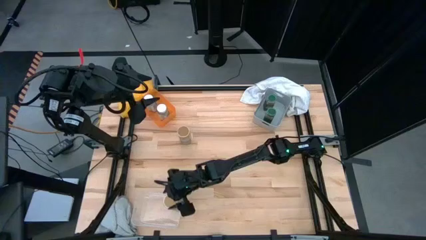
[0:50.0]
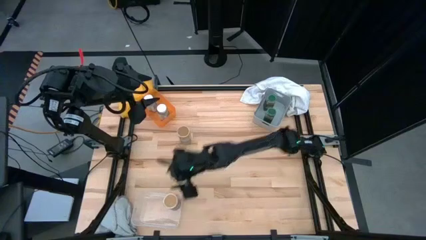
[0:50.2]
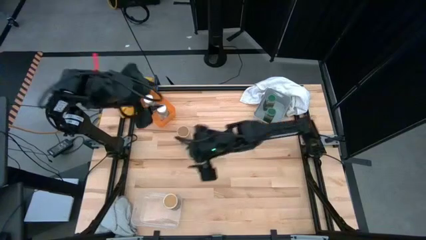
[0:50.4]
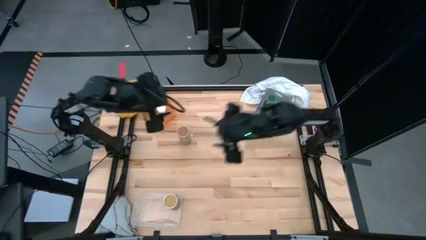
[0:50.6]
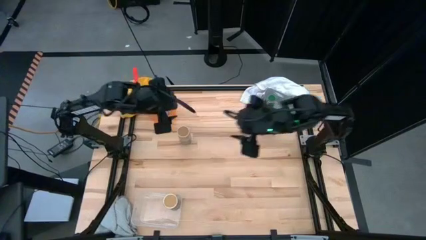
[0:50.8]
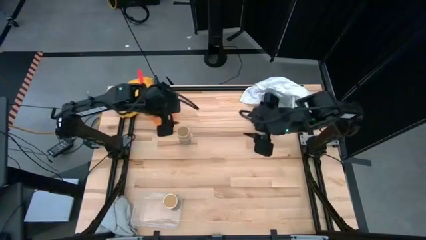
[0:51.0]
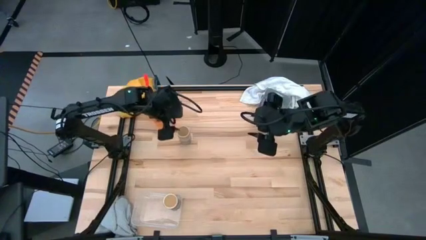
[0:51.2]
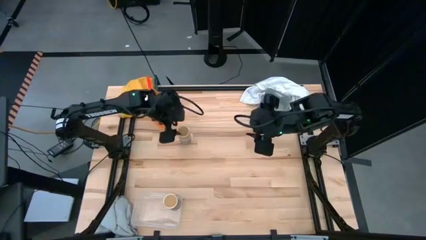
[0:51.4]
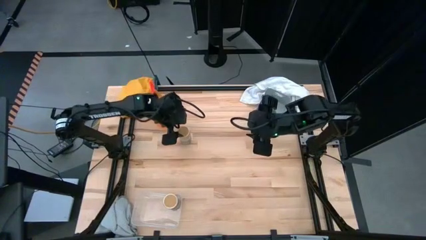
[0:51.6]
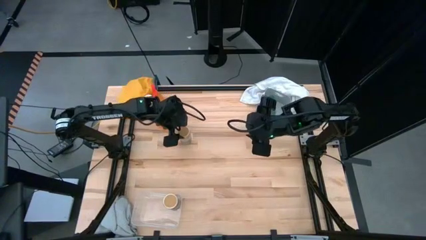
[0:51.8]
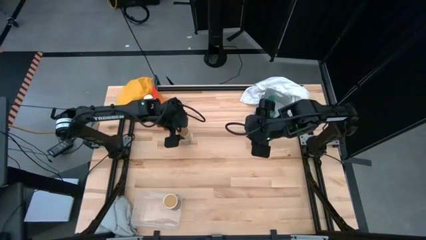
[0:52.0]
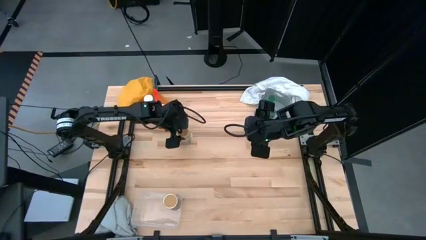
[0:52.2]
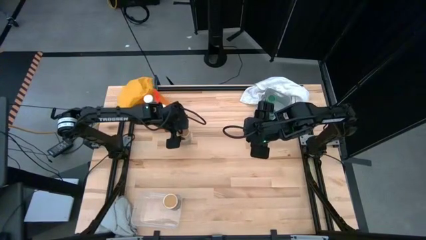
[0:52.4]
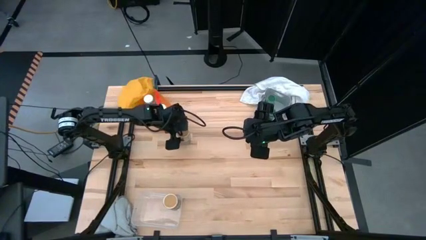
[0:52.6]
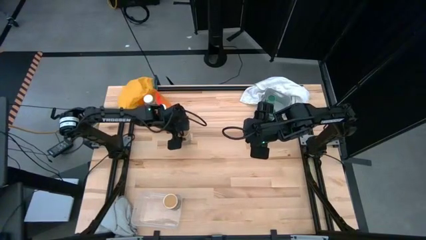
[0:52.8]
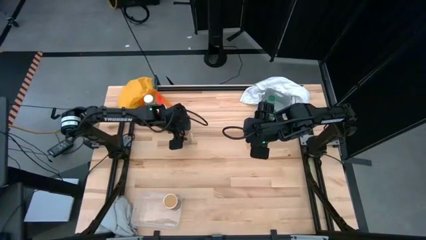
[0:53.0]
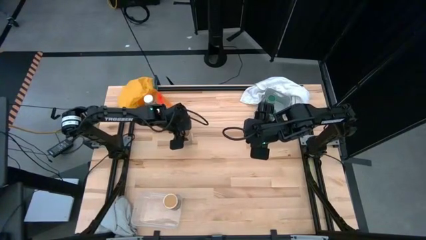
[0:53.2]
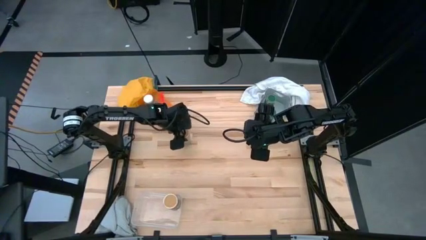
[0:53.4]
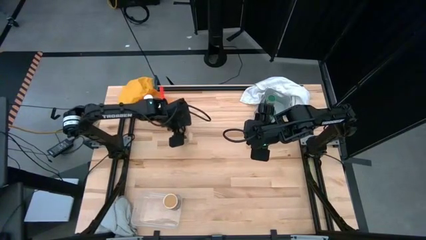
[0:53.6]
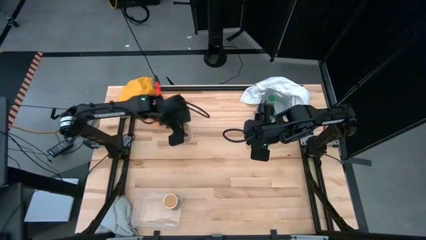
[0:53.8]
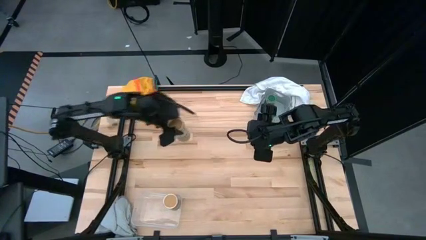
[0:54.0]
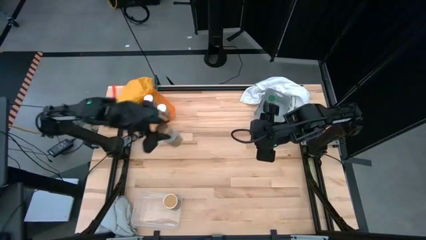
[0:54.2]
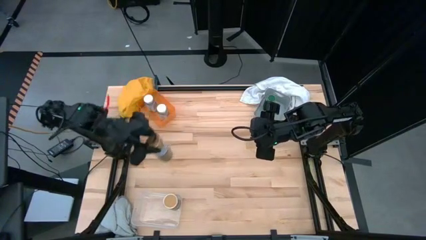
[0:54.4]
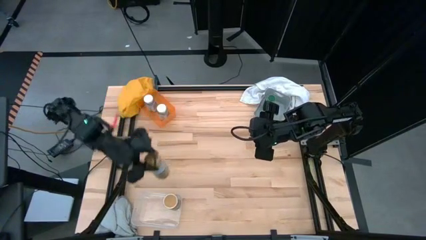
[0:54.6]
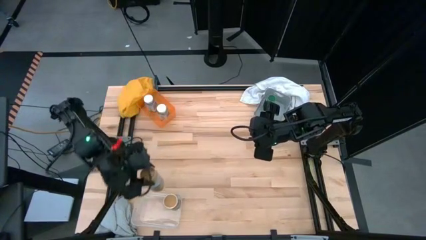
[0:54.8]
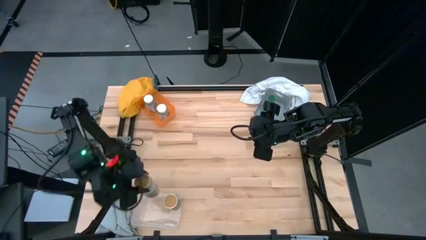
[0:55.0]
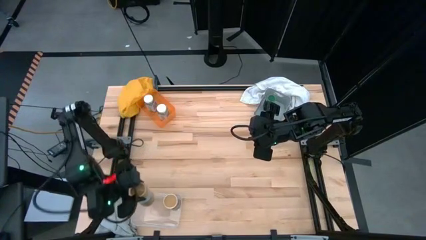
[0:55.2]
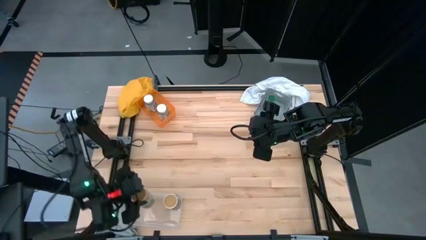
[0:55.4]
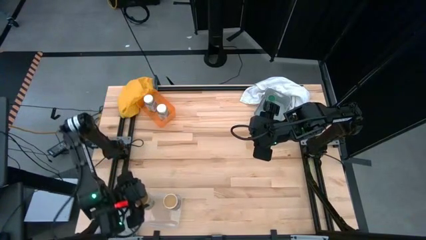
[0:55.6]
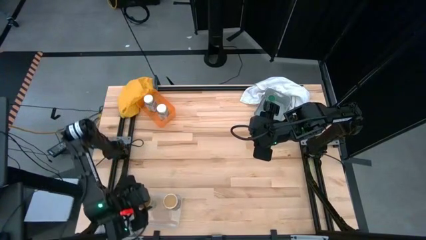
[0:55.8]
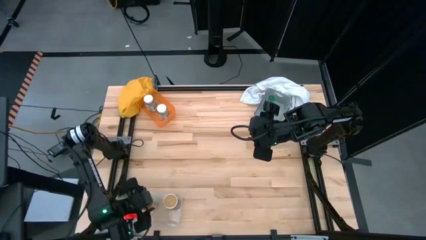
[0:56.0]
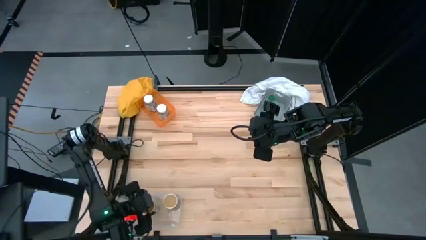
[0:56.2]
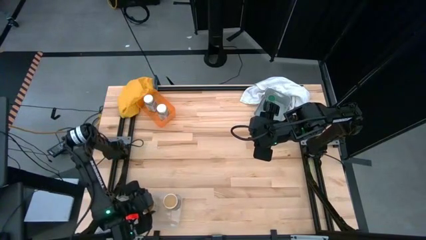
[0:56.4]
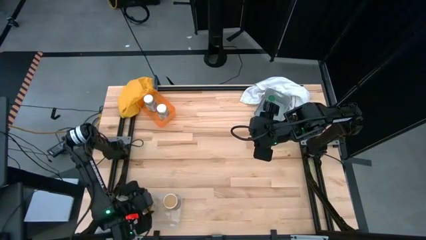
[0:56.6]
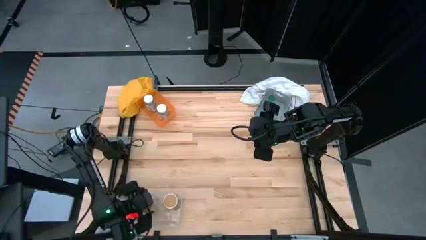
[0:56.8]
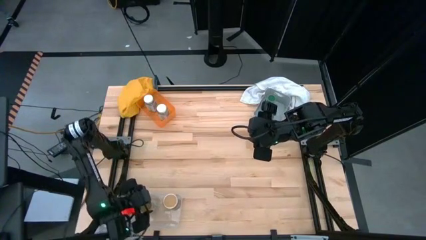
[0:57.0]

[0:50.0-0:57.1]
Task: Sort spices by type
Put the gold seasoning bottle into the transparent bin

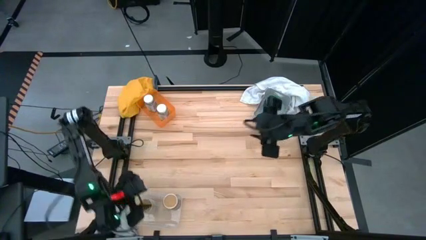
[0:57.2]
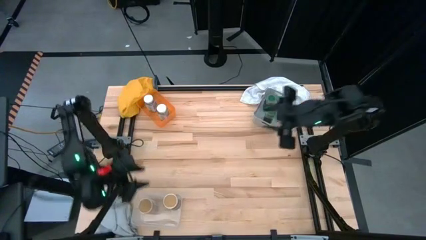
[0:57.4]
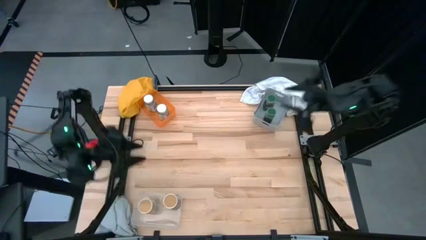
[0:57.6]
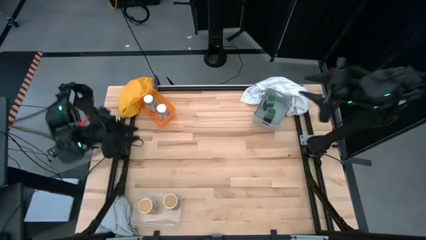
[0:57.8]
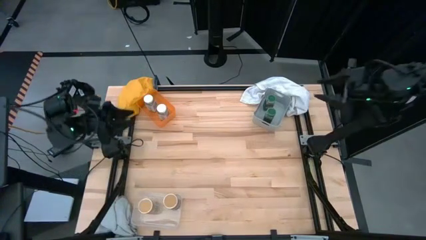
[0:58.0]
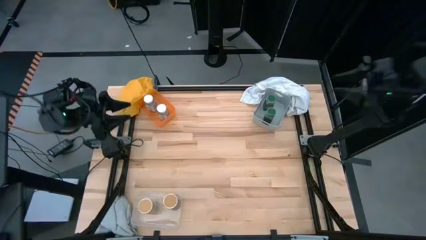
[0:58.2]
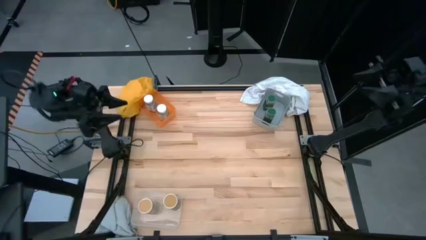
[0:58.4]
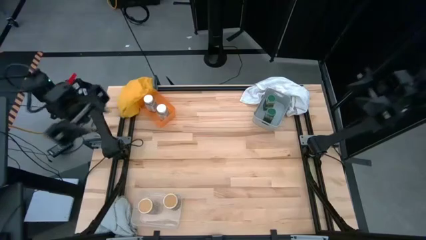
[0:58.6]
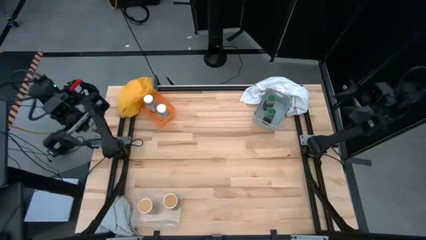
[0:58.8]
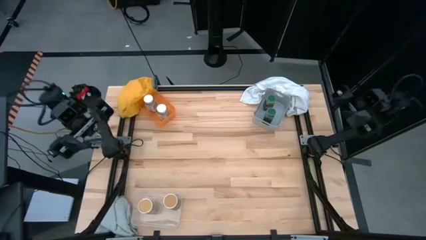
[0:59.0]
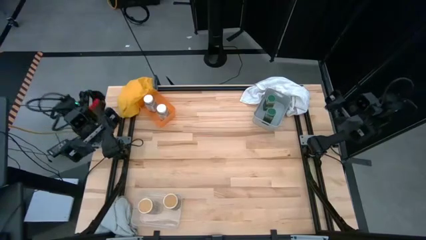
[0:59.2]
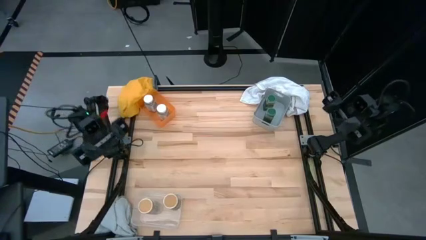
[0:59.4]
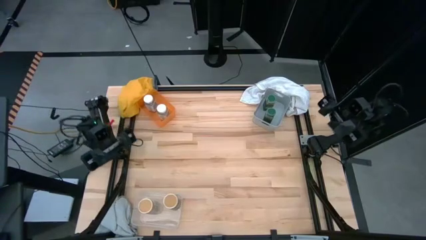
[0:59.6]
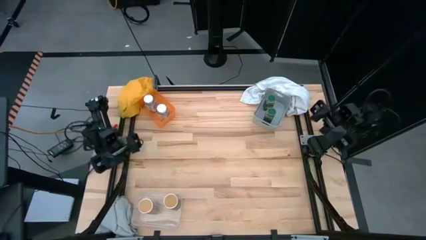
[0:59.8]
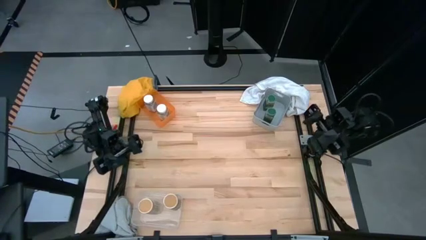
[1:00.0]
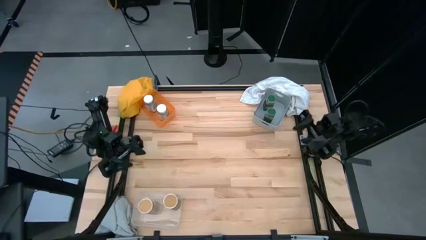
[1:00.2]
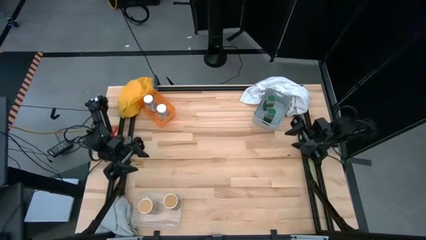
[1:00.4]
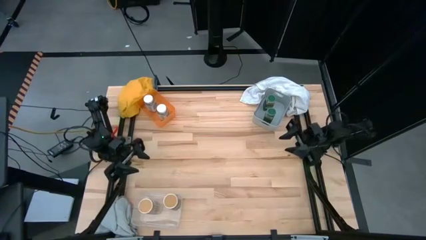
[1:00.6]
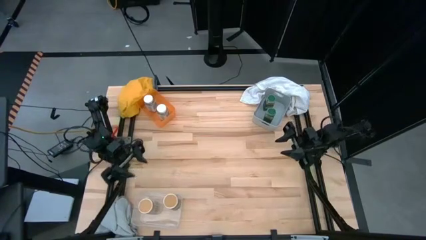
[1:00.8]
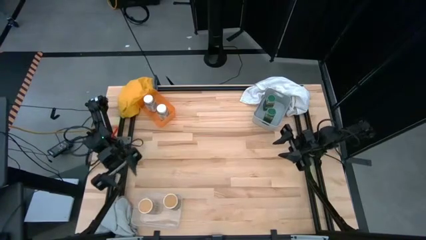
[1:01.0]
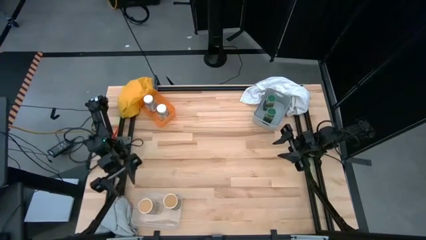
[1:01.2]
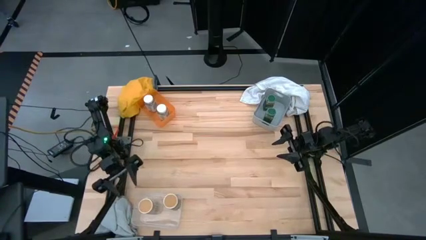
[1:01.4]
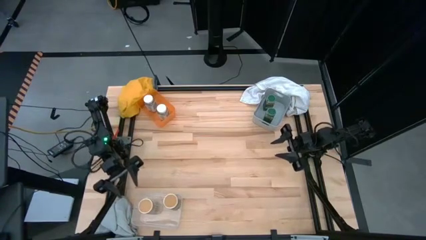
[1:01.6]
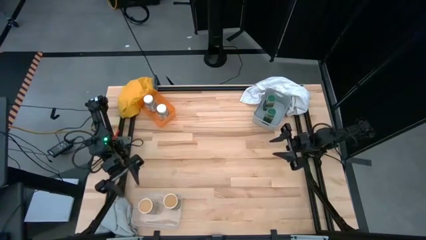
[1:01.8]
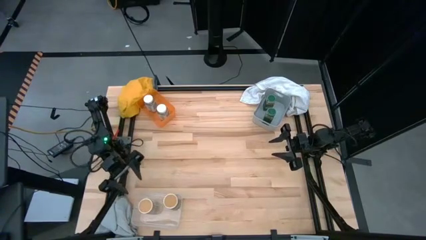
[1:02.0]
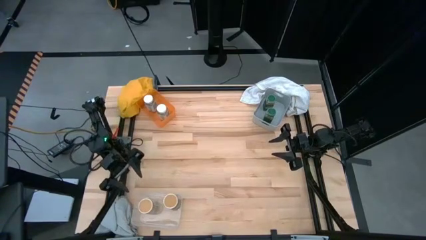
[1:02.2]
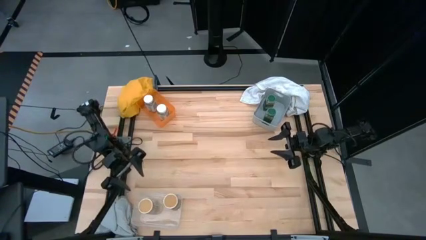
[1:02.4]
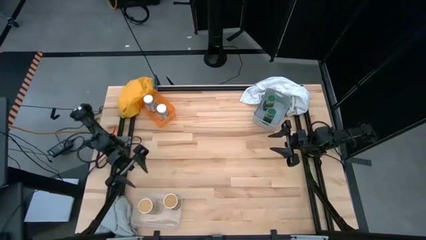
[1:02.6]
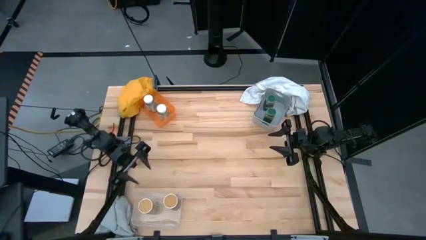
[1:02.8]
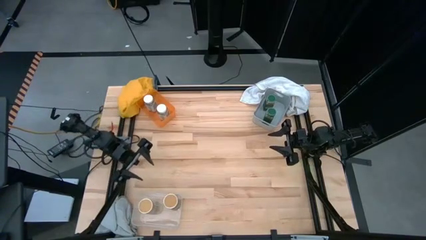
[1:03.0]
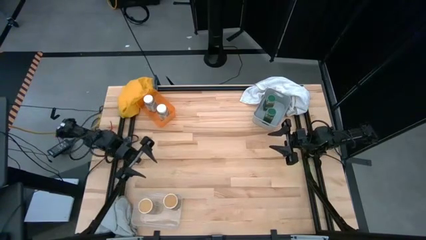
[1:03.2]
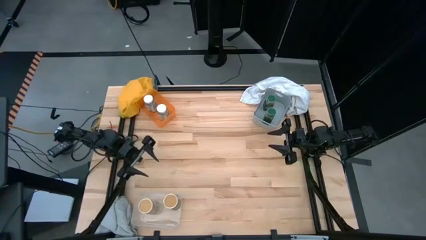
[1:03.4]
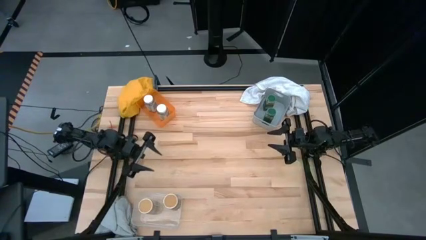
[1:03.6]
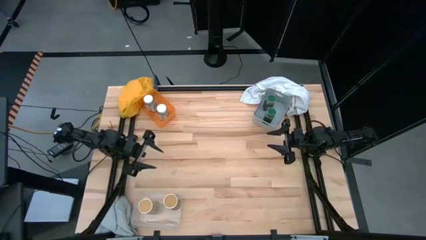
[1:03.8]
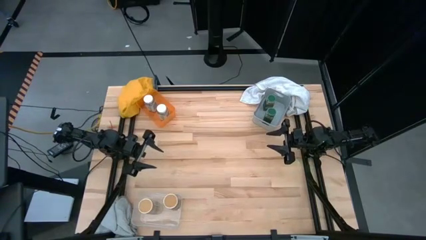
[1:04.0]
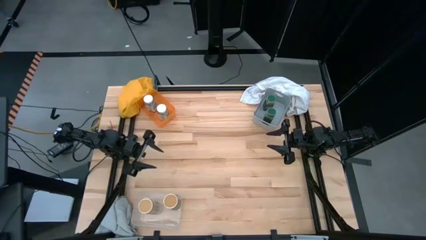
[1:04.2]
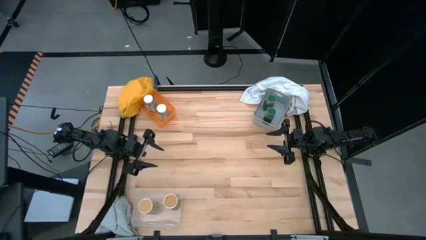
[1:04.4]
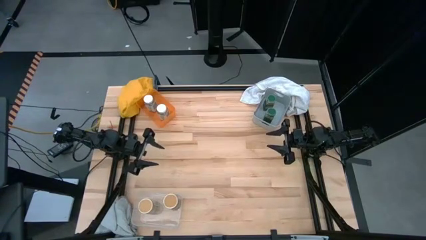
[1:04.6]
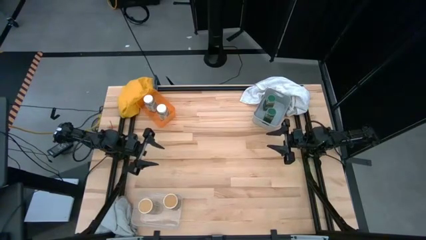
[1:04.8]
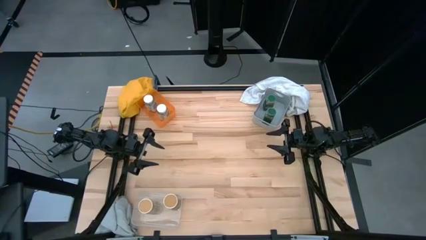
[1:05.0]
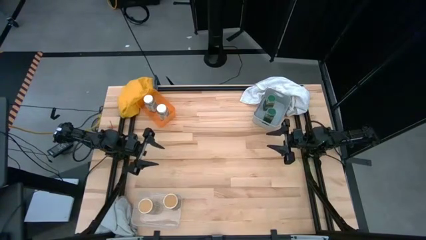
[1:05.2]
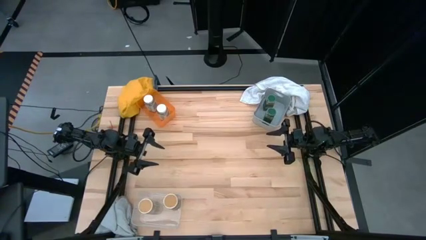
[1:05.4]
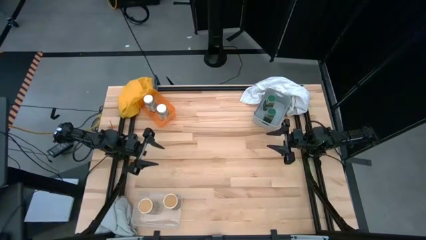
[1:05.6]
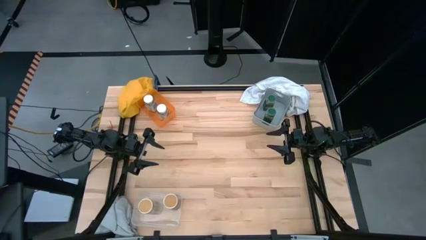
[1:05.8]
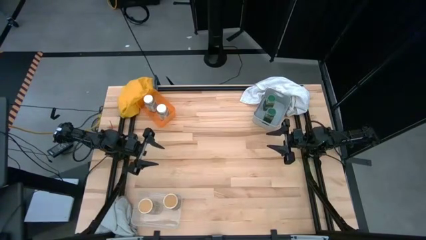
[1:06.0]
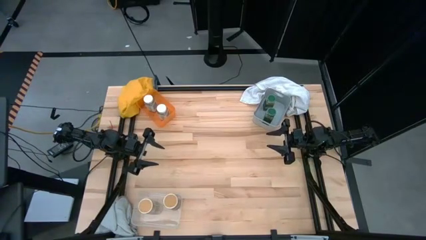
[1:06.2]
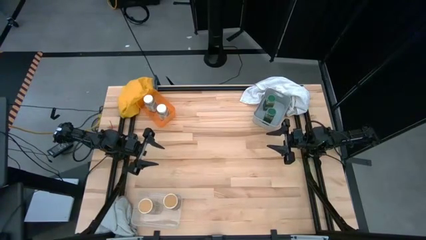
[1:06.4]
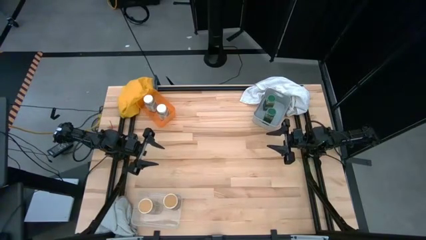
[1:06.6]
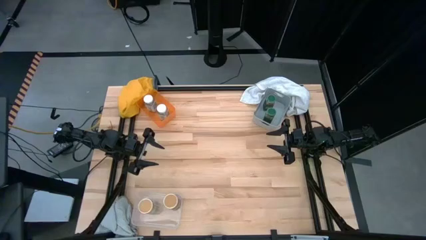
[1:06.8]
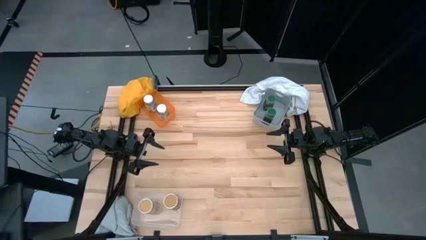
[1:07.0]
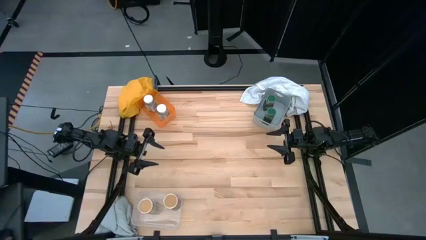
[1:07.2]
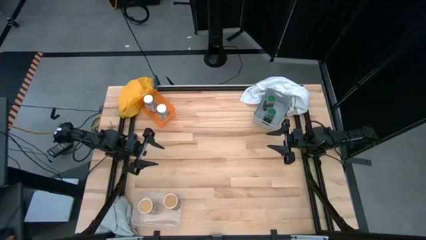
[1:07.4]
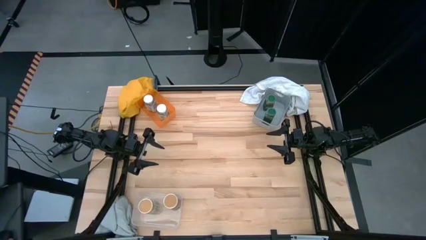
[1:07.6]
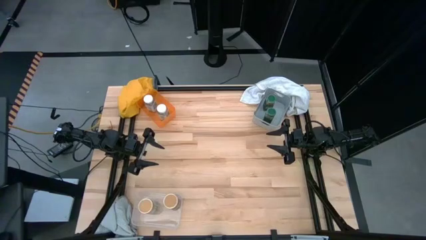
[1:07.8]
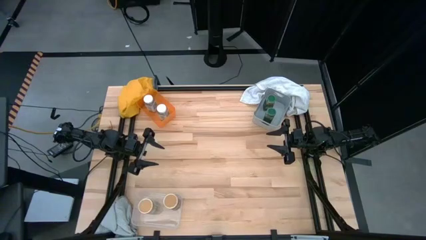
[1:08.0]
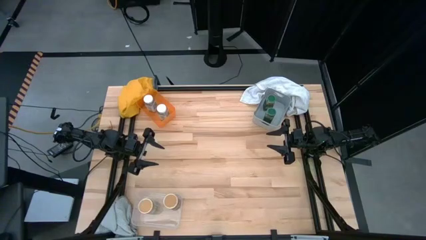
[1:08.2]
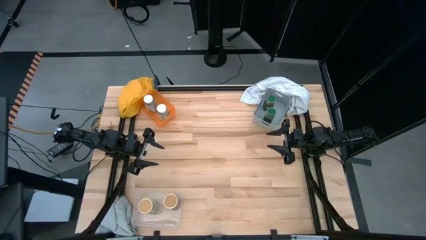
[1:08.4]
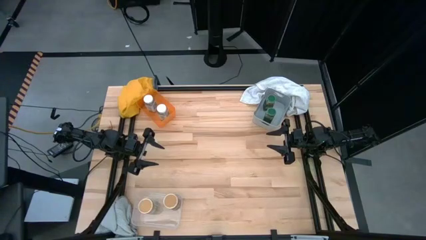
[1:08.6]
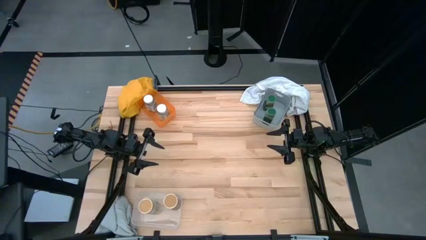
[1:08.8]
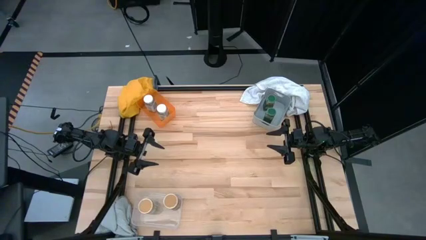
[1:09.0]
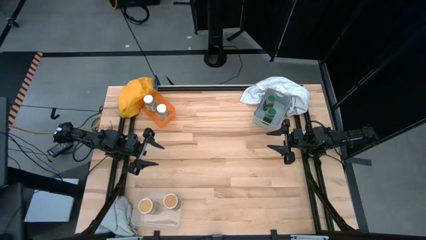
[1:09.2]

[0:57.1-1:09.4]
Return to Home Position
